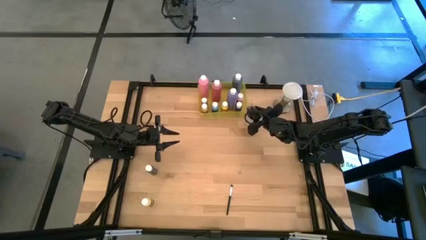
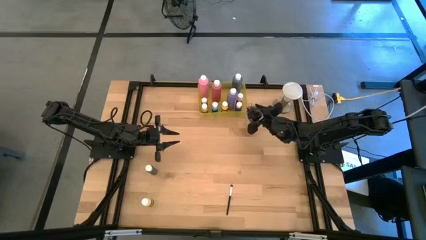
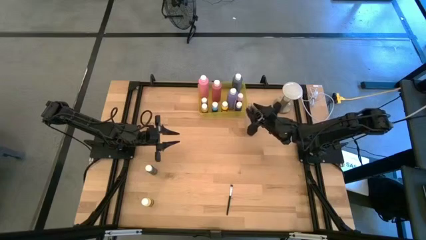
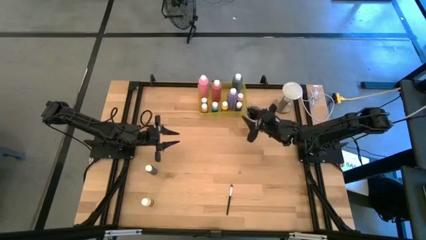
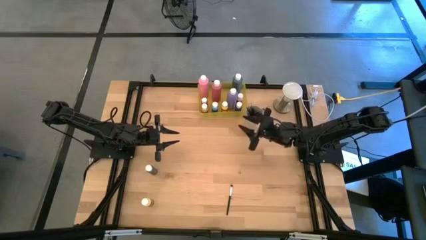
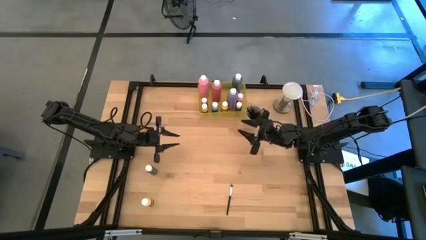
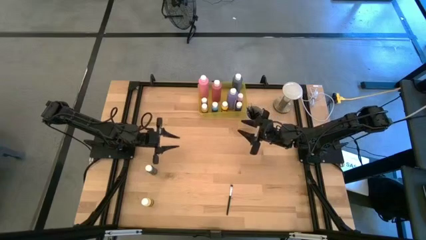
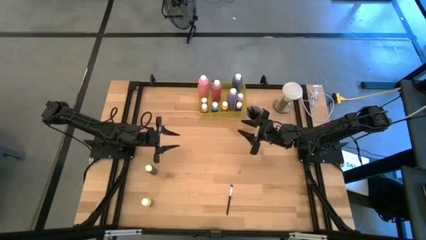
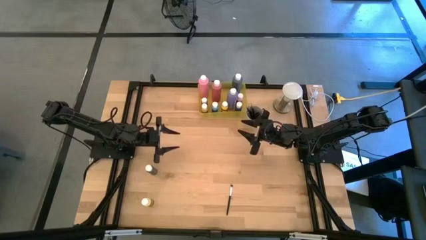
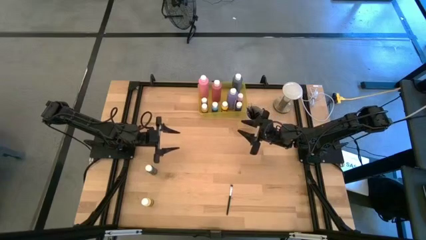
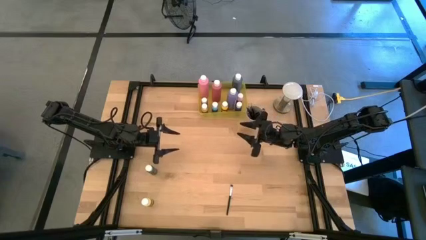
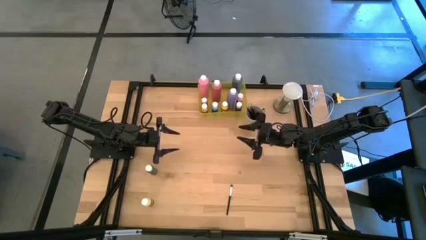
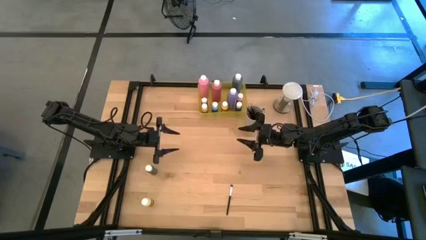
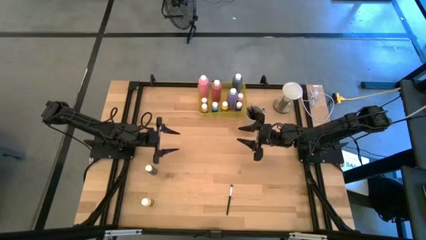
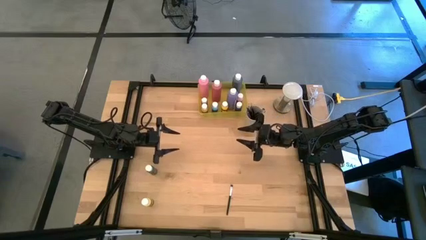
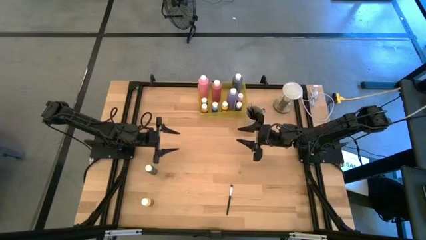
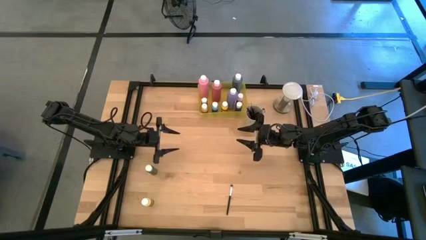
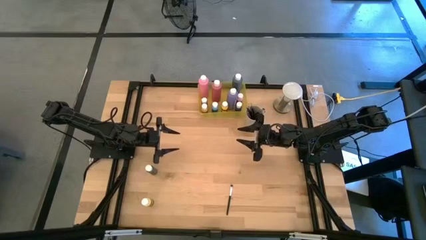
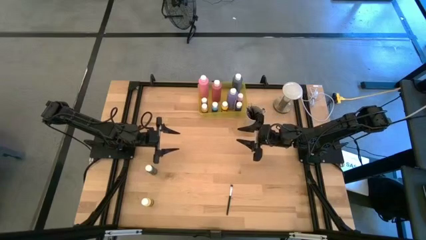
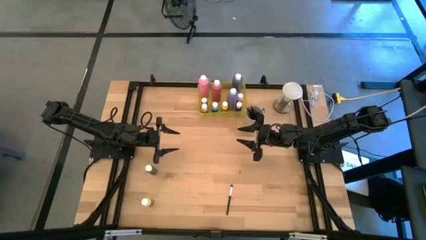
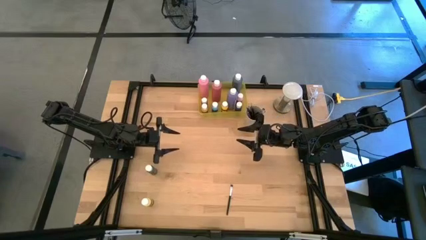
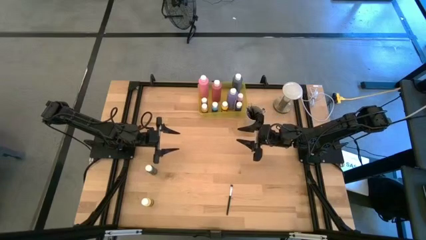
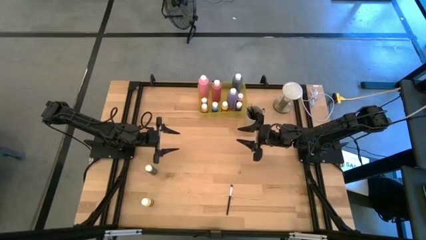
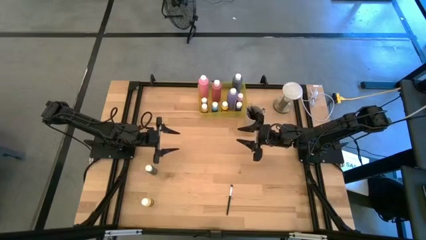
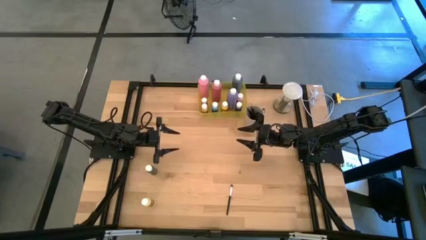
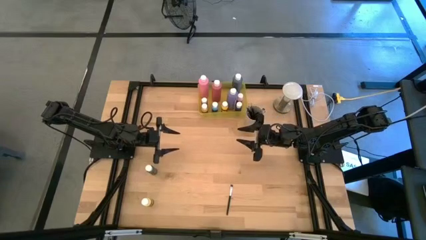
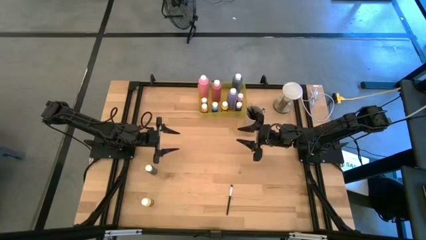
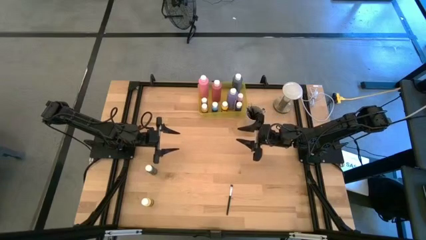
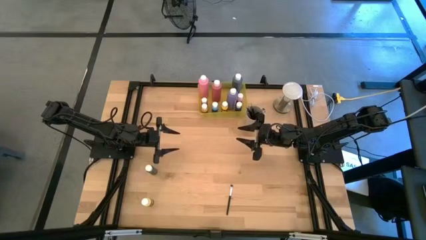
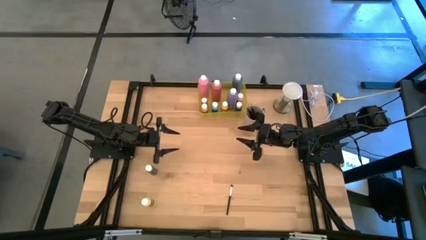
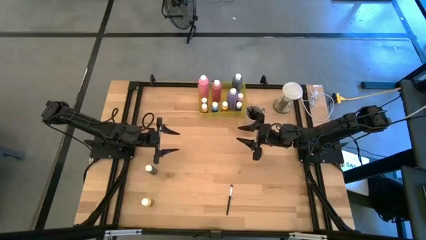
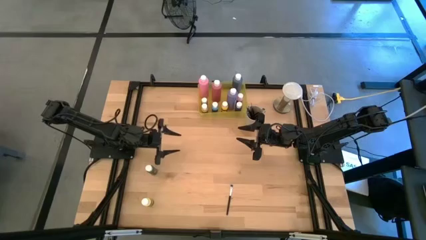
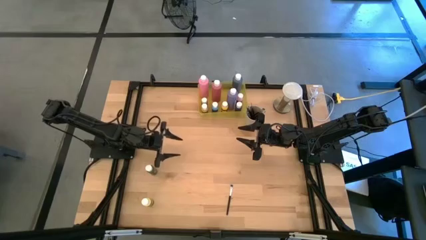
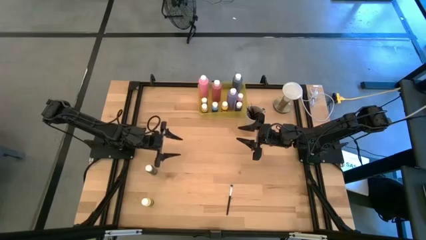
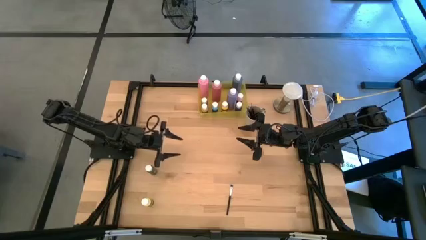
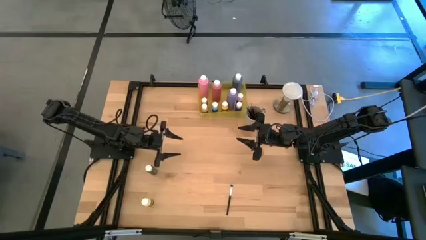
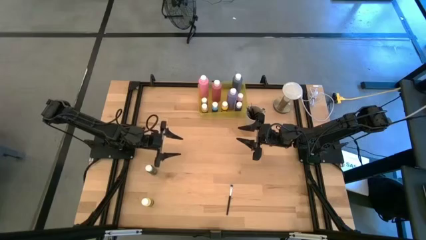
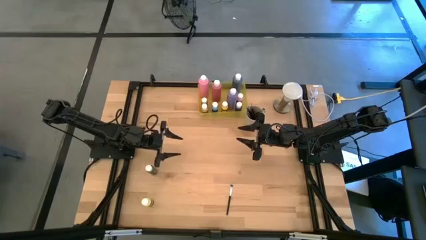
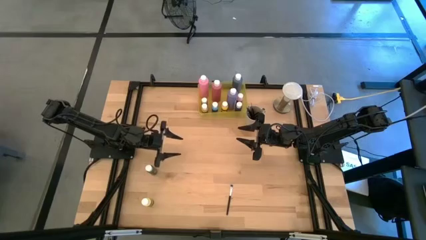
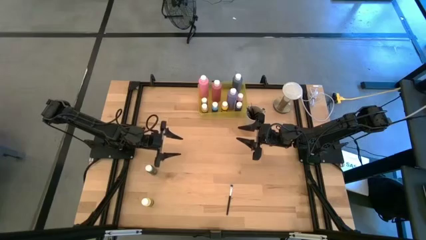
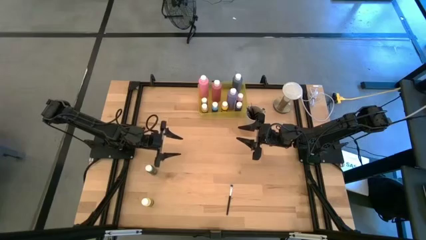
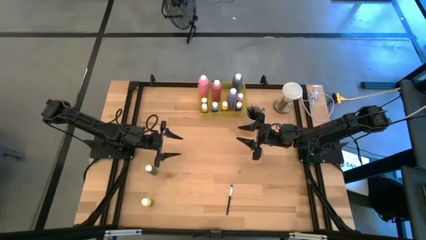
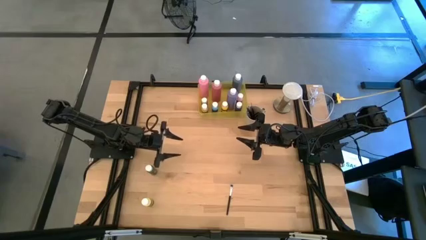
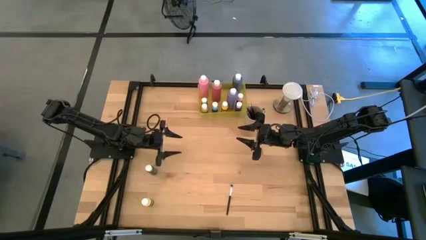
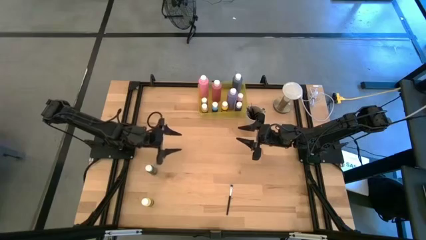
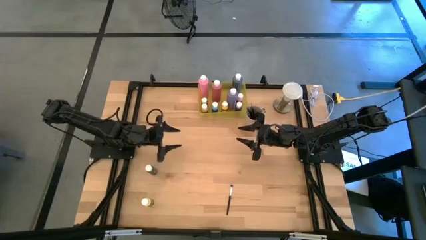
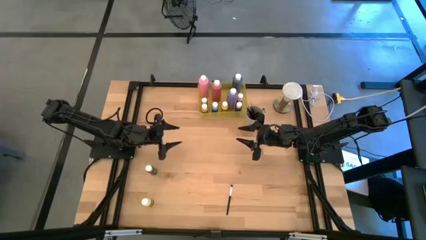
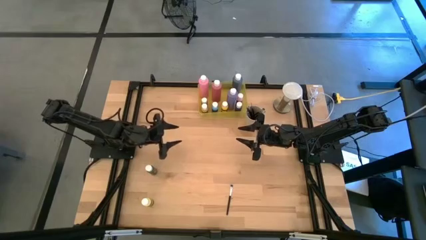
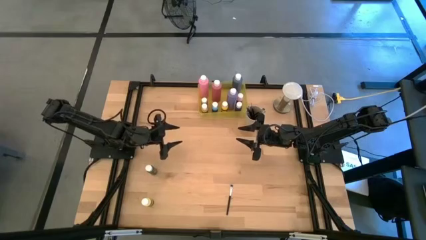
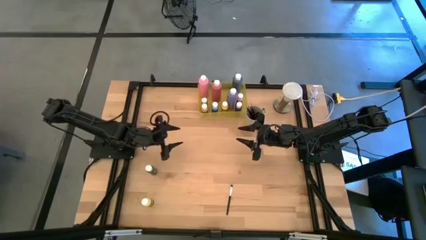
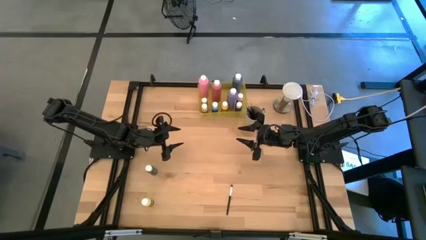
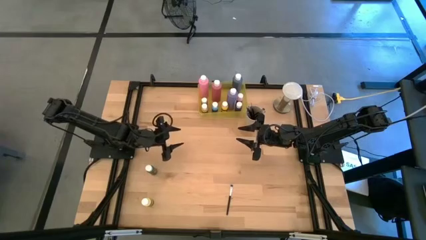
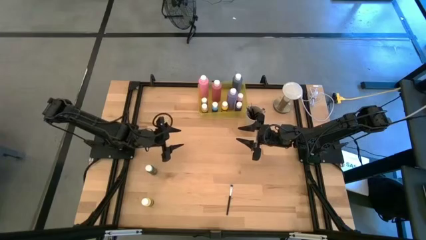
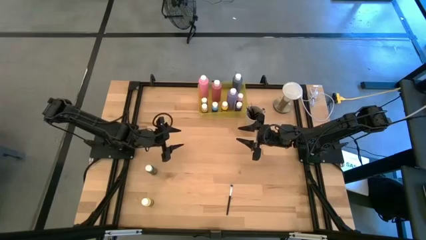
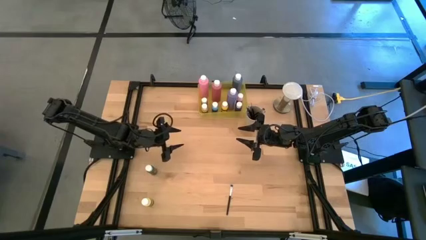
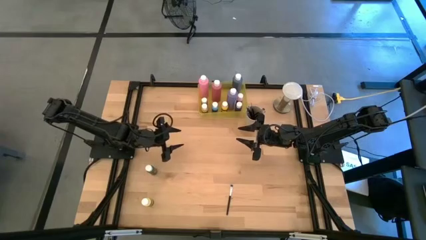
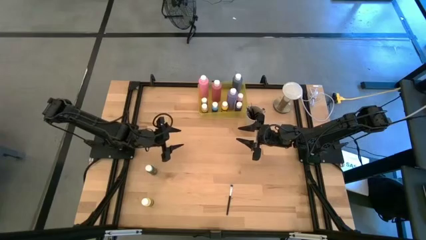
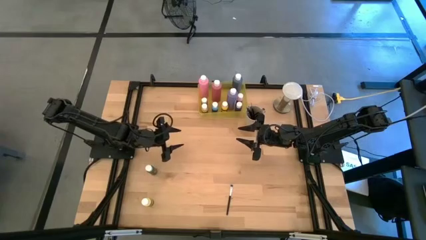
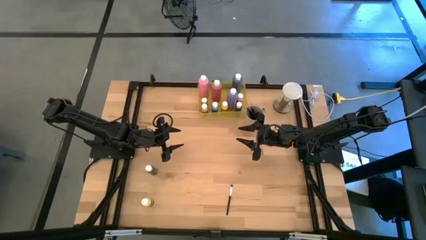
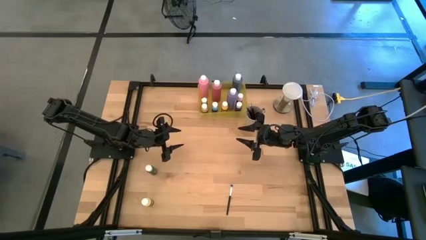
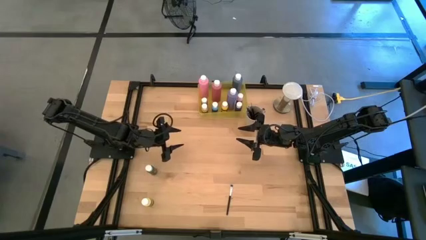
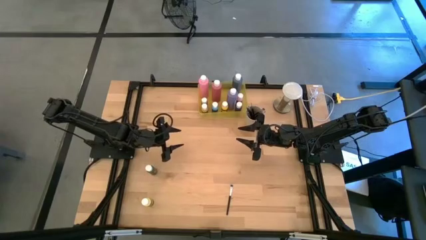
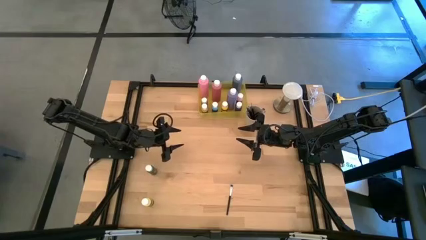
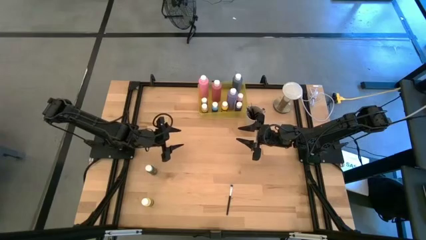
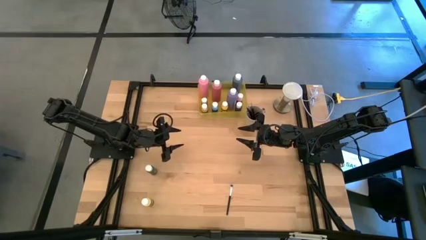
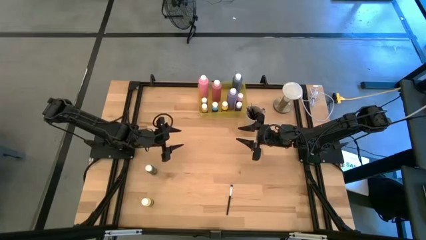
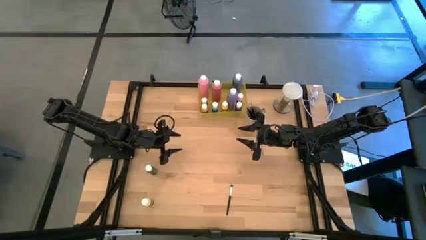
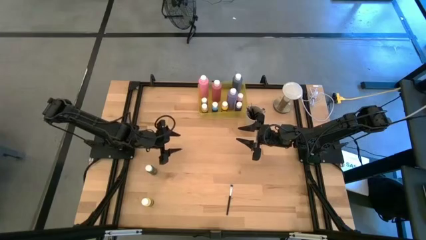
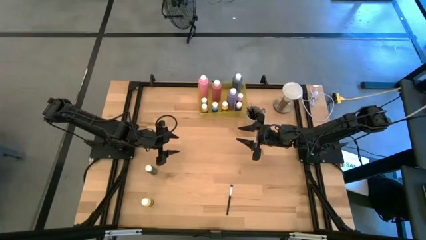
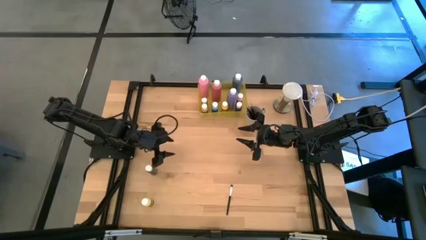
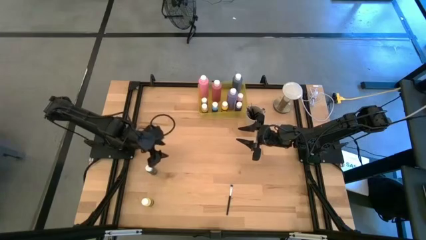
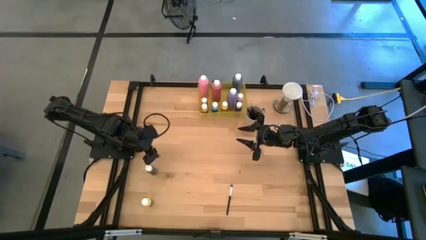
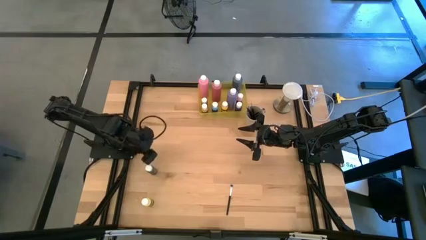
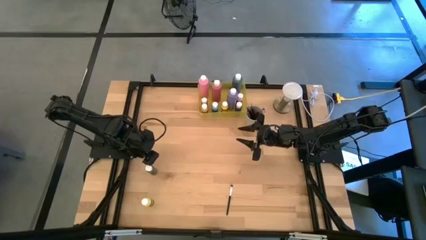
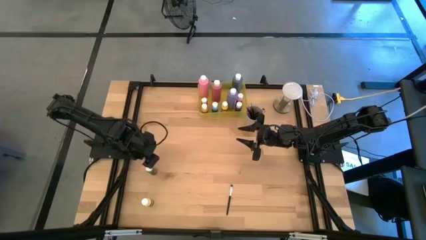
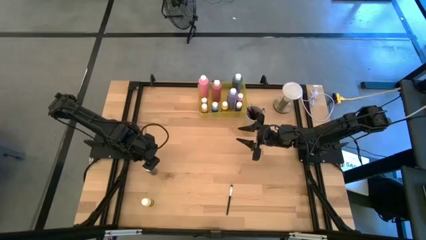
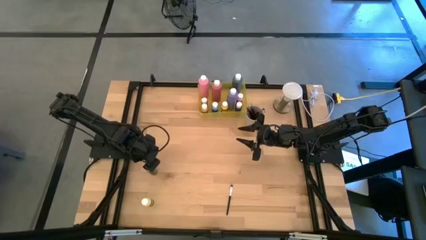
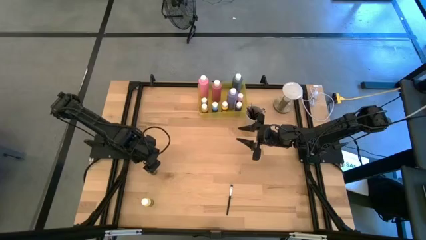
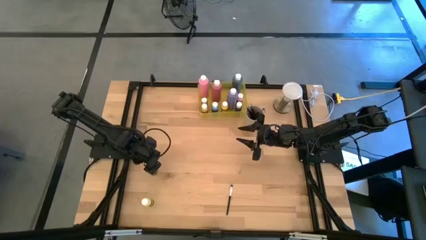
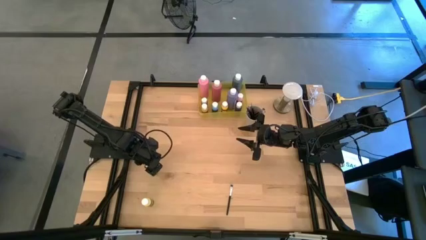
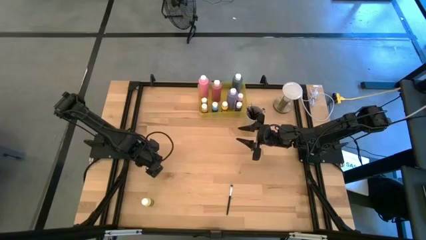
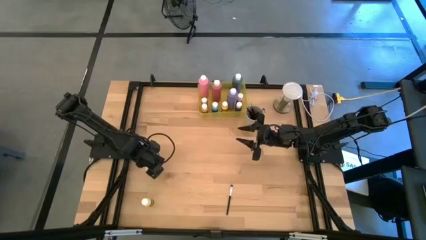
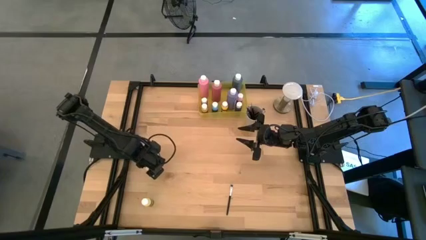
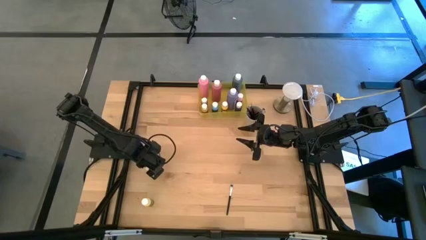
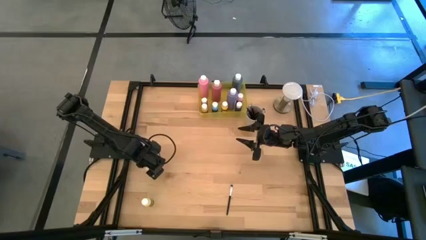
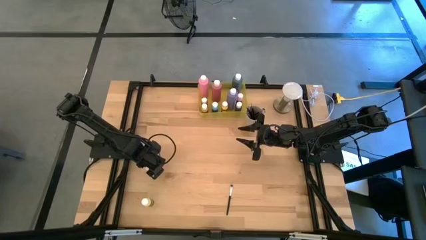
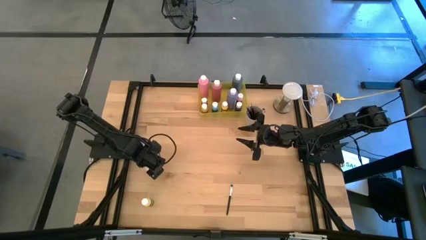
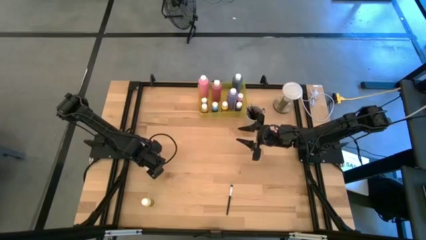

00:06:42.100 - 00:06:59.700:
Task: Pick & Place Paint Supplies
Put the small green paint bottle into the yellow bin
